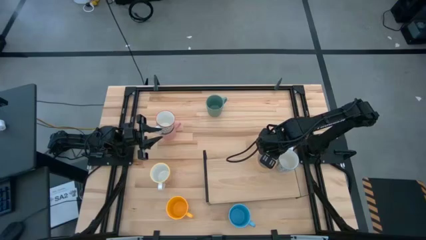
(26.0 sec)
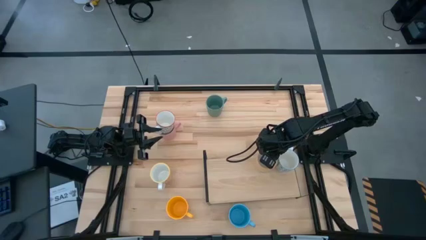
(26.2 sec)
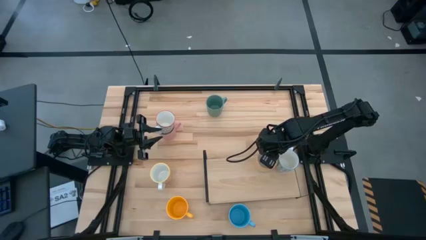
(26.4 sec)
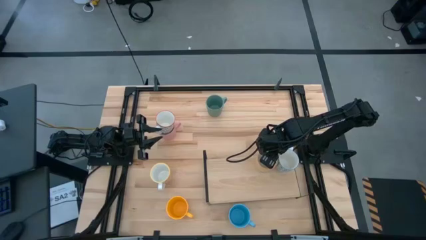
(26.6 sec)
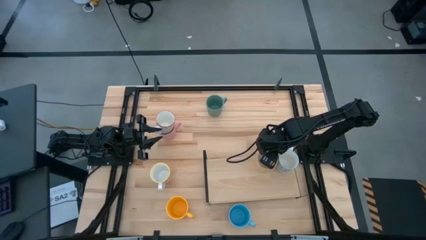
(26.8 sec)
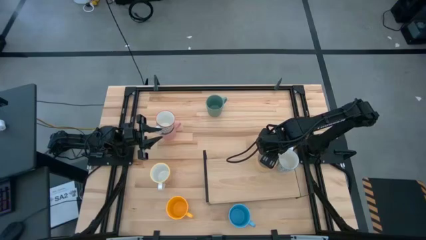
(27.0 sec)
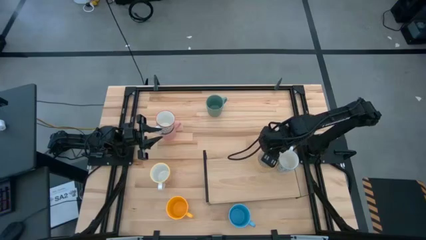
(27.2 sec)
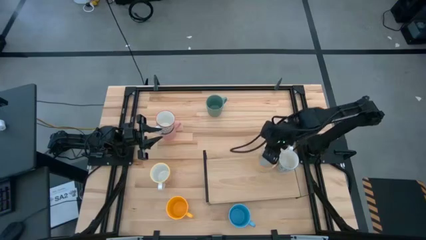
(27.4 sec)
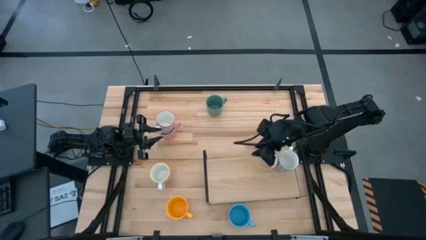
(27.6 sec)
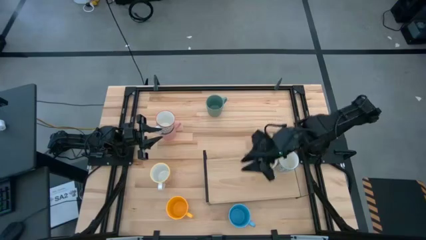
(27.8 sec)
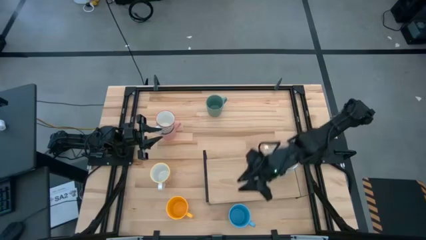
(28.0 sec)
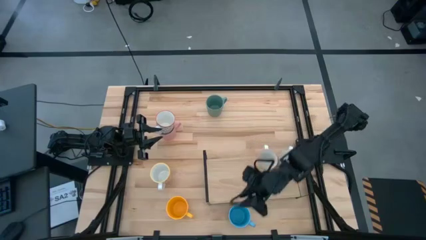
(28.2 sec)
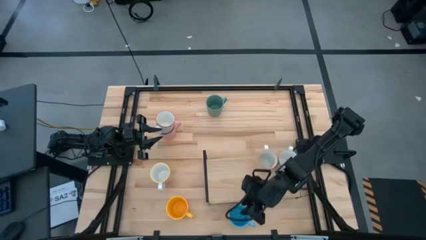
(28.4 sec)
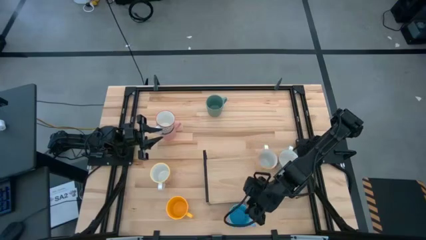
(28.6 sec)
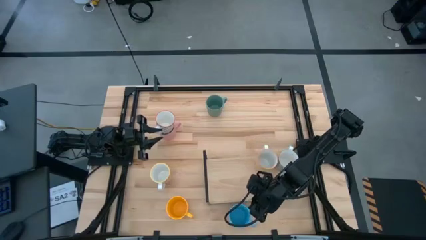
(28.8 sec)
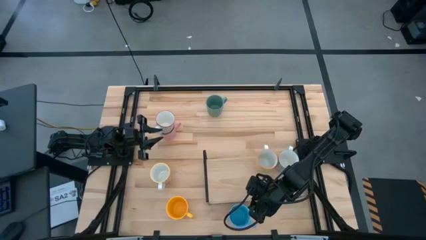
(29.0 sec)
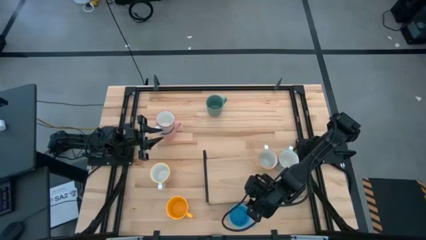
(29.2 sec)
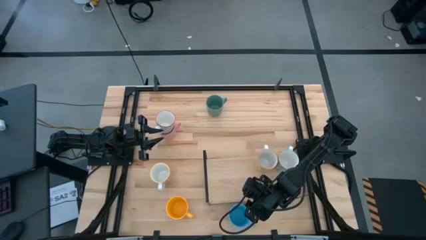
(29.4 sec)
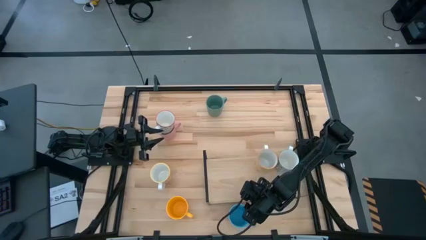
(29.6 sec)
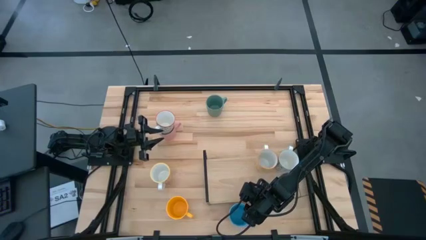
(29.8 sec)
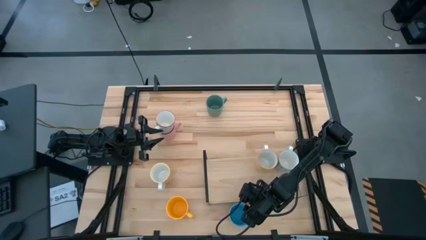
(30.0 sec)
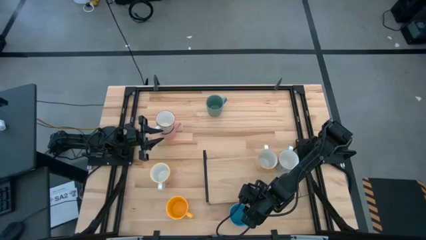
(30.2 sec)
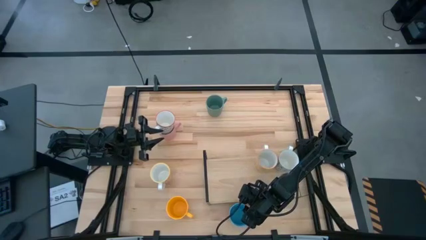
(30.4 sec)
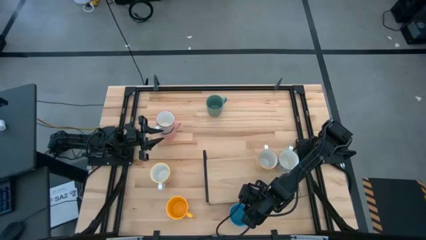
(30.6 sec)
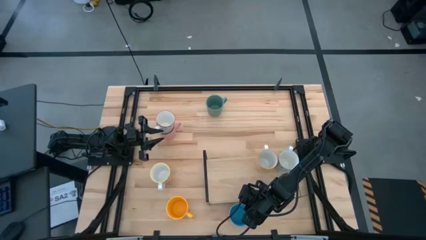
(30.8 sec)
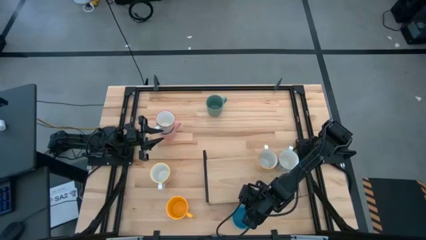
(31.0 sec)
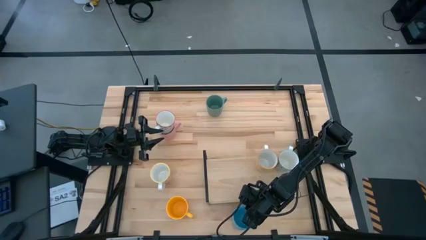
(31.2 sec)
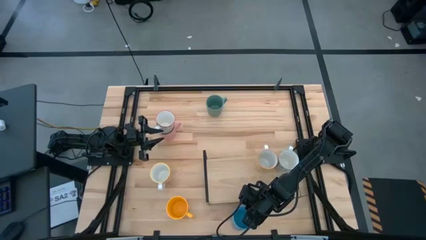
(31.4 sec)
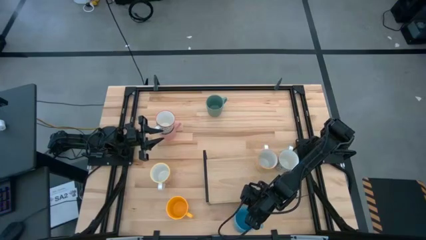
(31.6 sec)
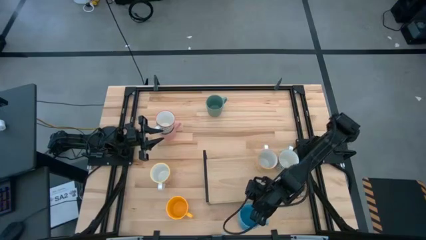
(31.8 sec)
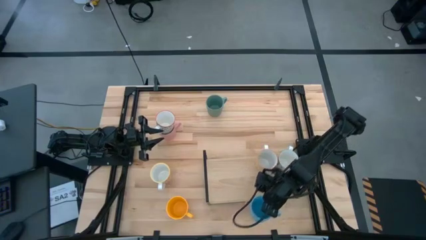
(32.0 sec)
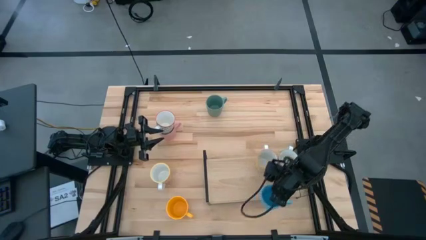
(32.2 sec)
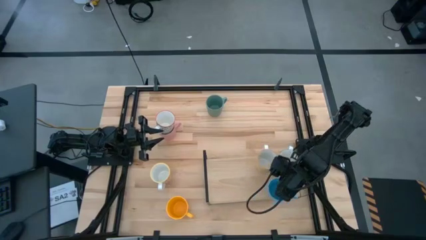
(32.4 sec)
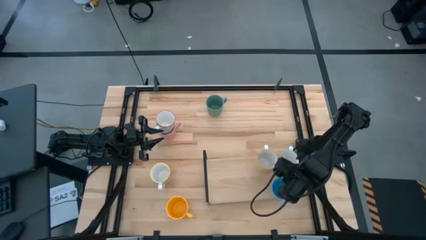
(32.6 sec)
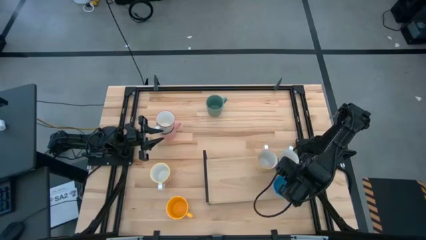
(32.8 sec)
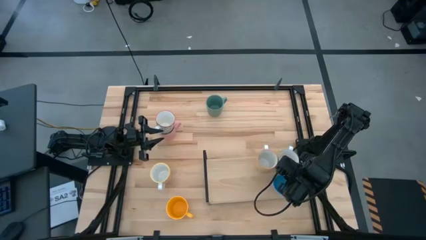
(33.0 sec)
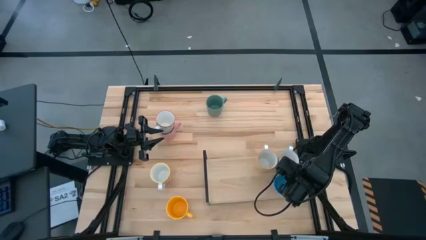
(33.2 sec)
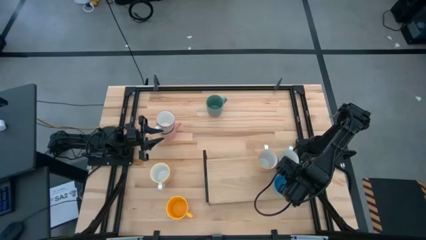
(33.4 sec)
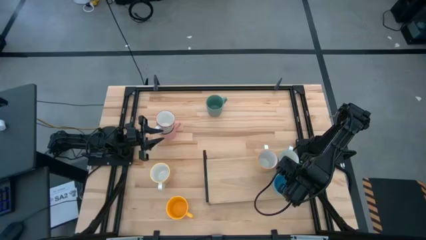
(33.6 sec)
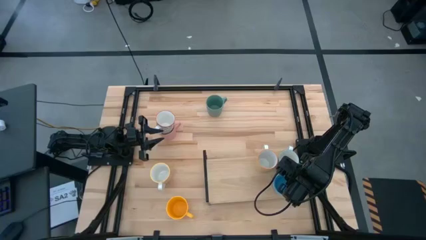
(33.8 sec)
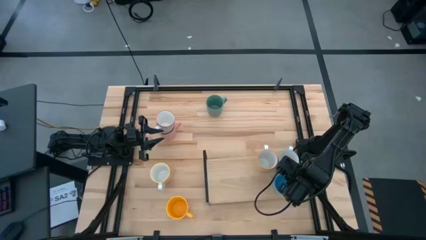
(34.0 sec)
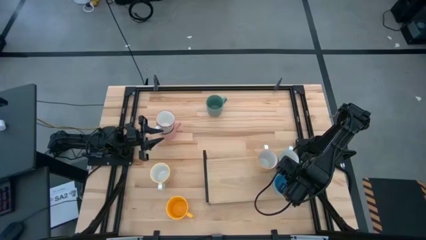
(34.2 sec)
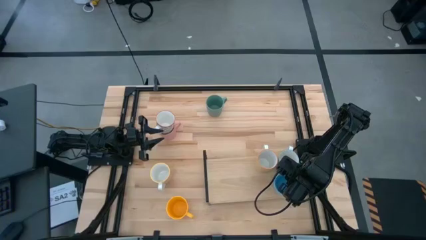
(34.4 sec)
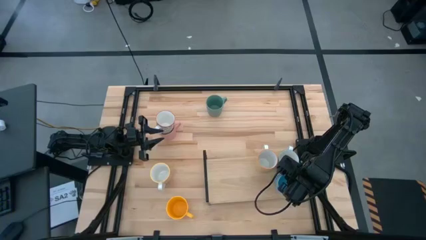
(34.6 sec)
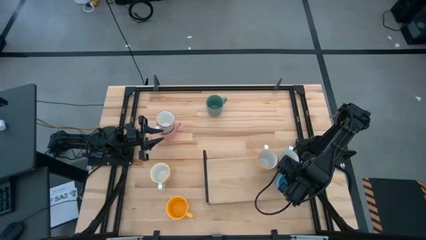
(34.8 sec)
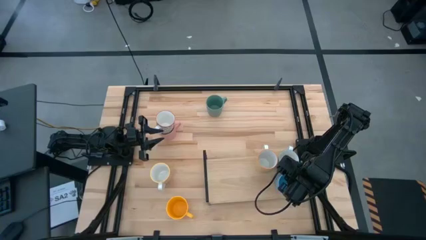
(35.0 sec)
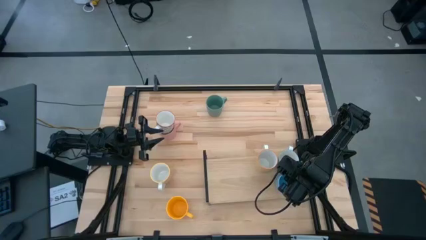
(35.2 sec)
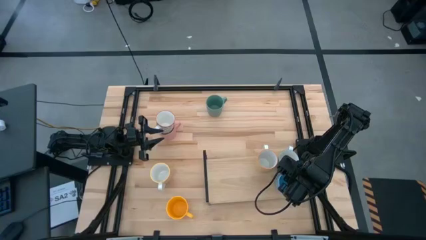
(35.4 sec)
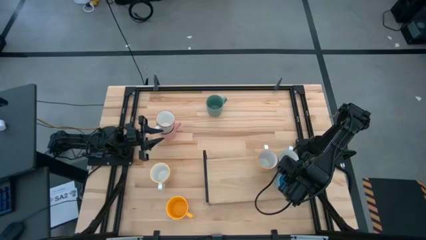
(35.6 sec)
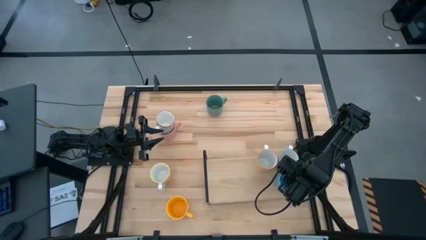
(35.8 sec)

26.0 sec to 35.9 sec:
Task: Place coffee mugs
Put the blue mug on the shelf

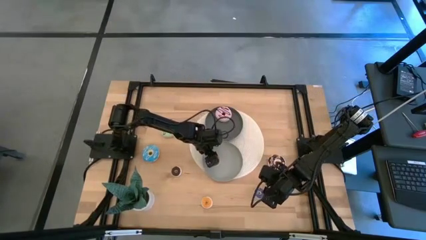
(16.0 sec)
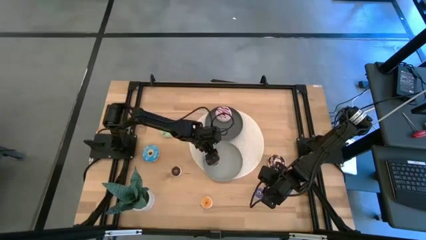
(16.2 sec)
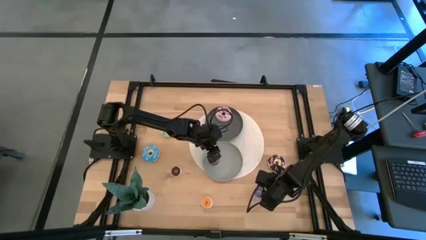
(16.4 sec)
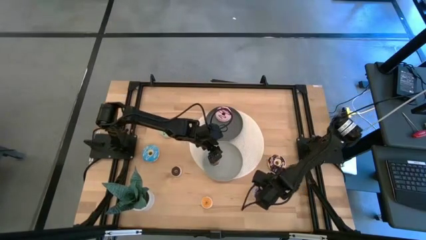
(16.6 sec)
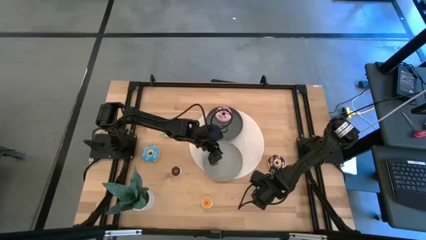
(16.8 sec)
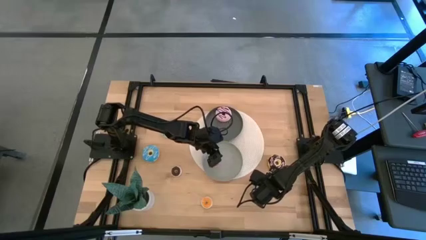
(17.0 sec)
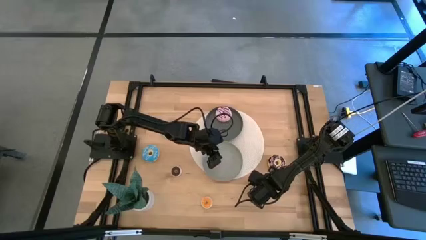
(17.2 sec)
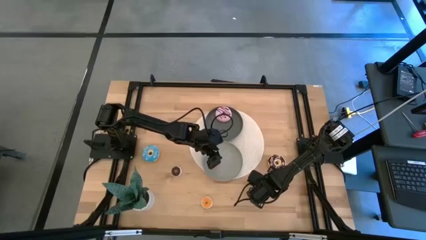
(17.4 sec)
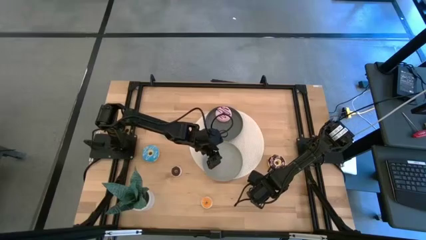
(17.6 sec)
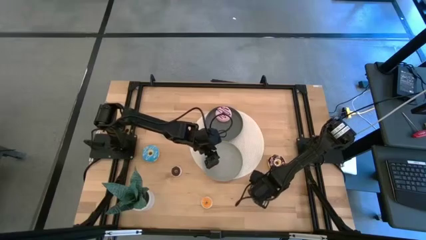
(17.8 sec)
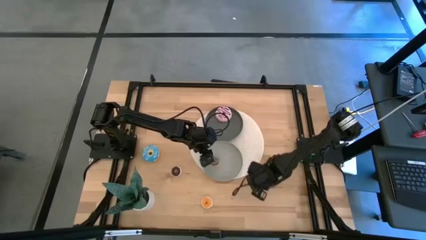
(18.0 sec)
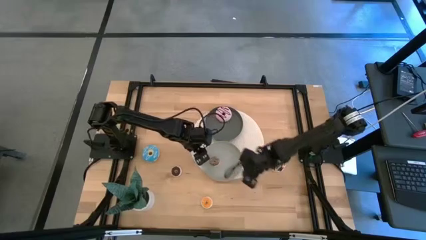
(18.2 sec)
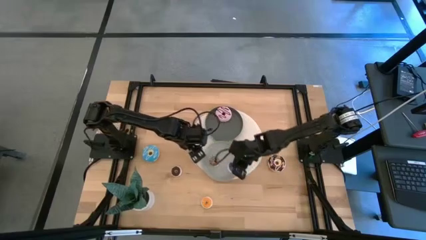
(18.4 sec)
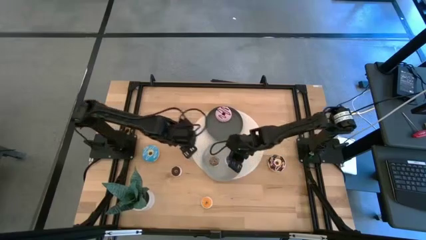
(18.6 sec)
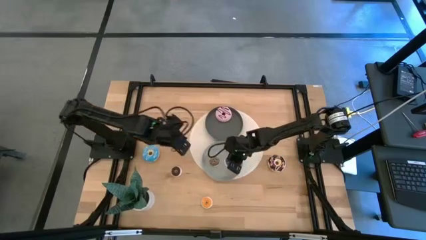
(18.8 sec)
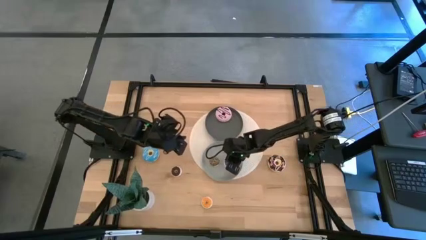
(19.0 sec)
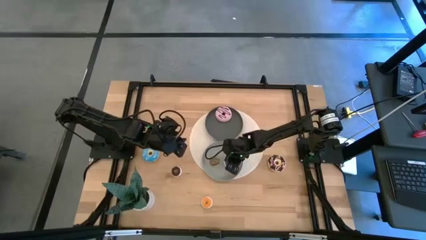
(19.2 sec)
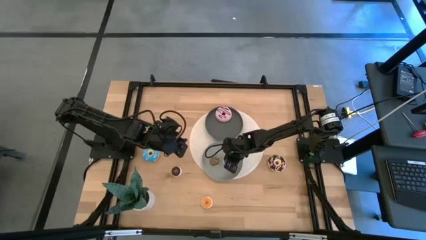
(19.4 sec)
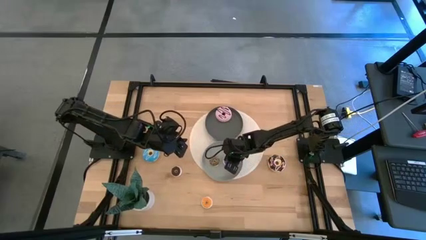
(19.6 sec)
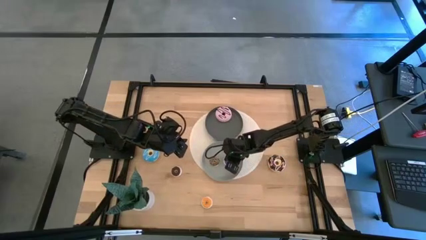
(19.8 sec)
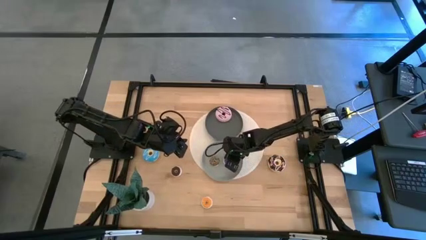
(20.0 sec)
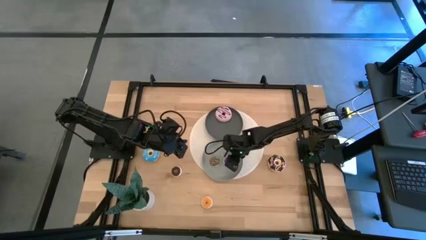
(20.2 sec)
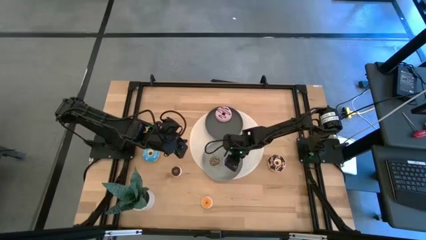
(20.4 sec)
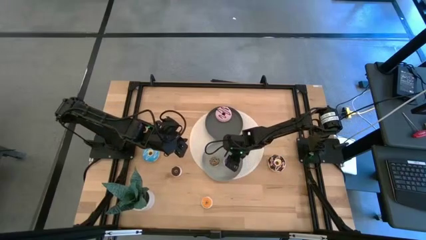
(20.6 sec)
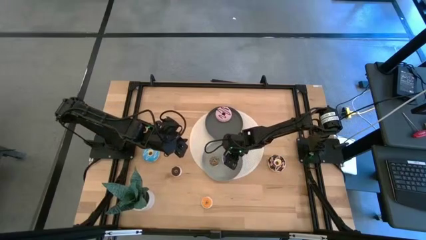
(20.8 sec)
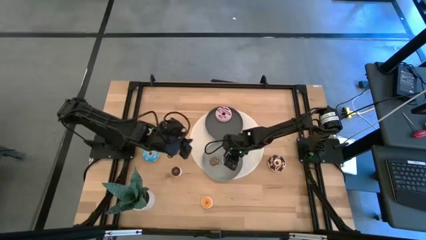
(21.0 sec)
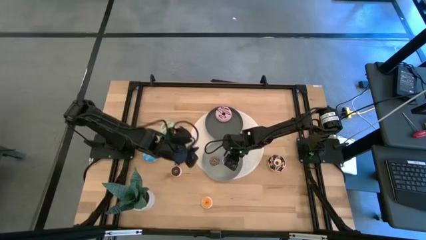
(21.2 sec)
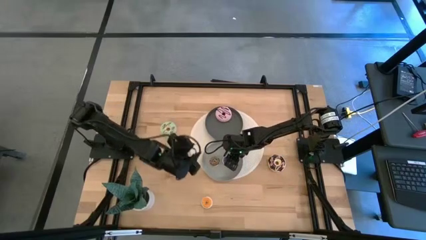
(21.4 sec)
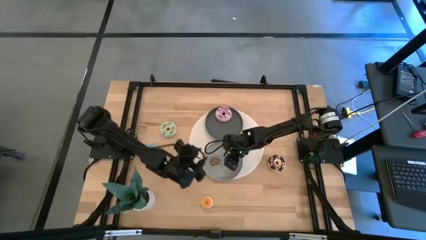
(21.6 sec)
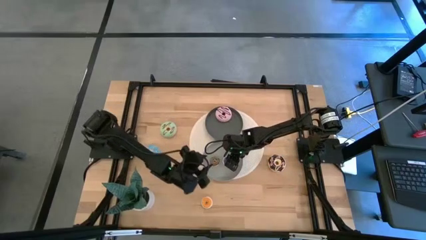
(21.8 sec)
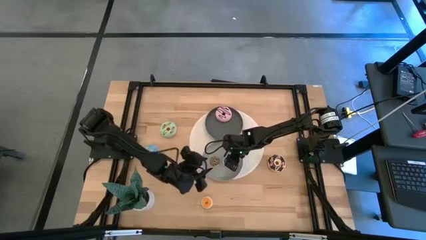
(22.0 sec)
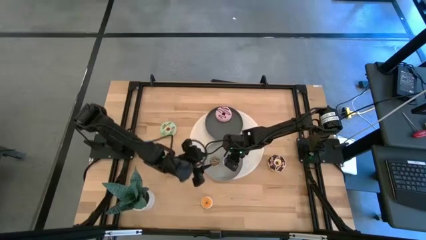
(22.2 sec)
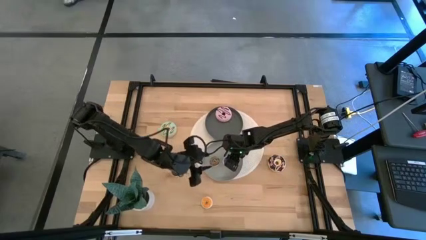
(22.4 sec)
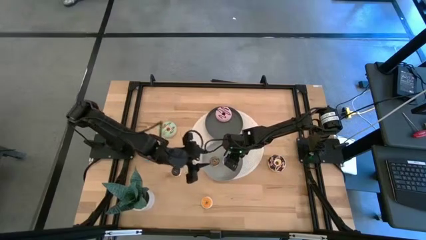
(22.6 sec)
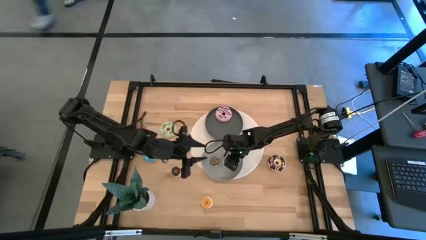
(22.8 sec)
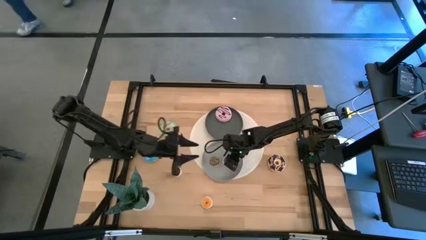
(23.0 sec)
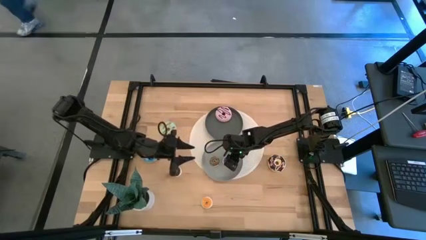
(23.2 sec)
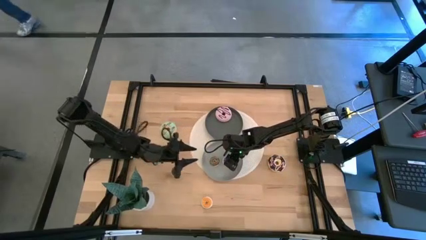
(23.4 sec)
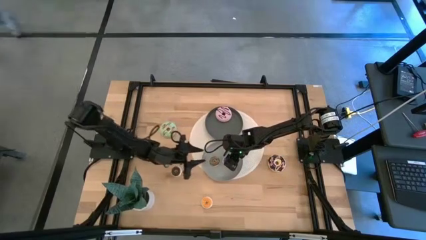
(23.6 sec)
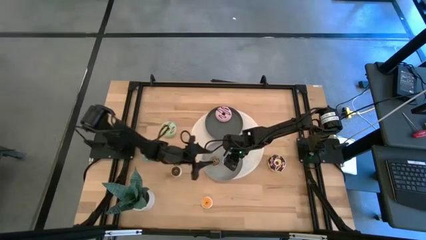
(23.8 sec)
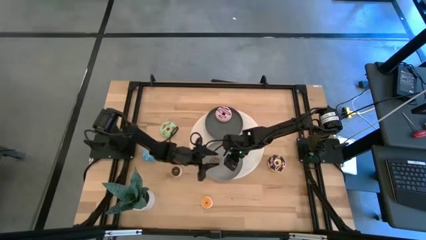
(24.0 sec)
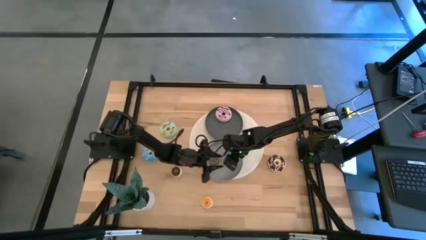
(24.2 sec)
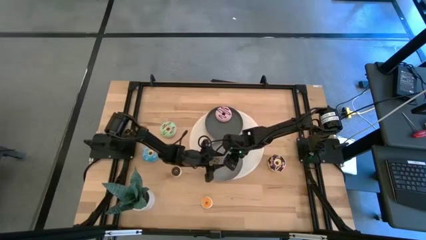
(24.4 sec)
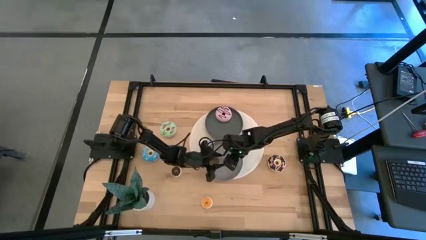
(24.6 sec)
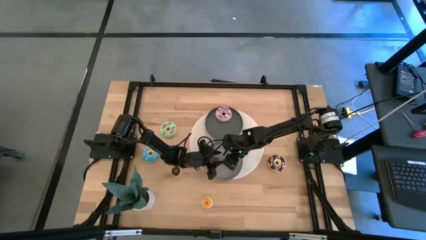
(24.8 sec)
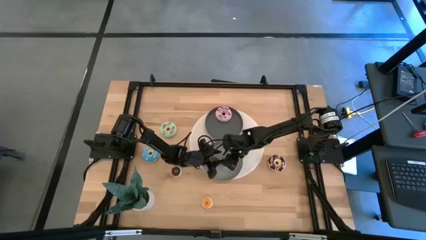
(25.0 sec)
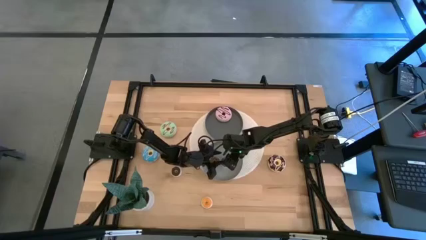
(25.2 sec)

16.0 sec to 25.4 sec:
Task: Pick & Place donuts
Put the small blue donut on the gray plate
